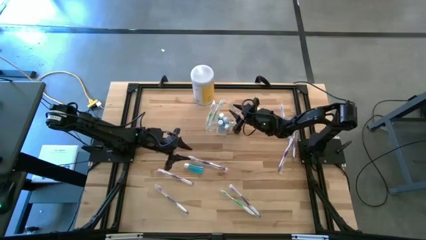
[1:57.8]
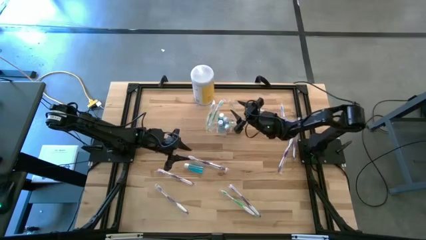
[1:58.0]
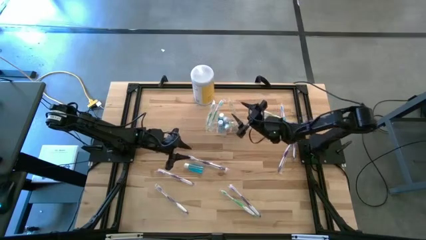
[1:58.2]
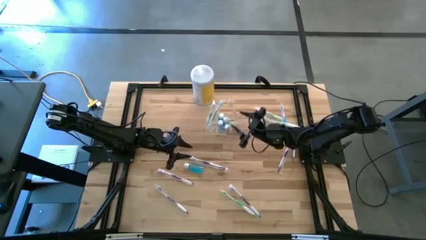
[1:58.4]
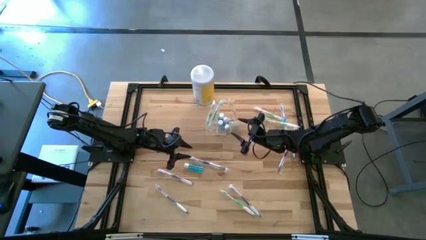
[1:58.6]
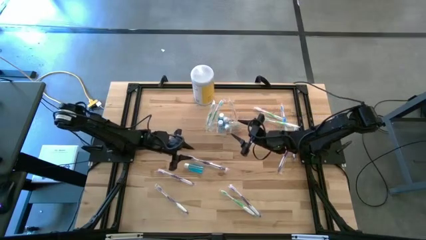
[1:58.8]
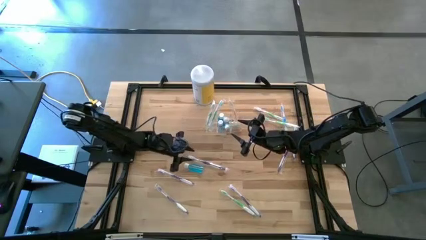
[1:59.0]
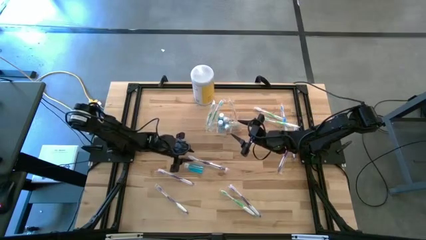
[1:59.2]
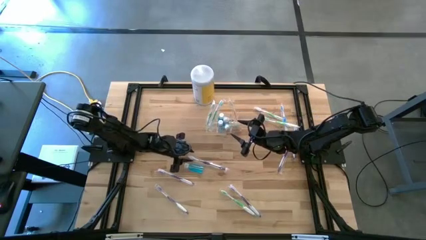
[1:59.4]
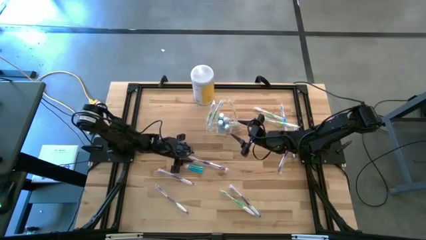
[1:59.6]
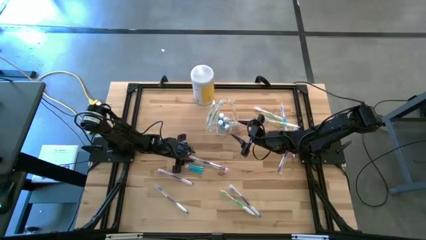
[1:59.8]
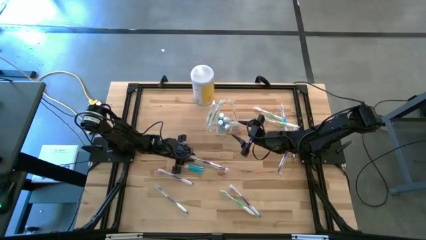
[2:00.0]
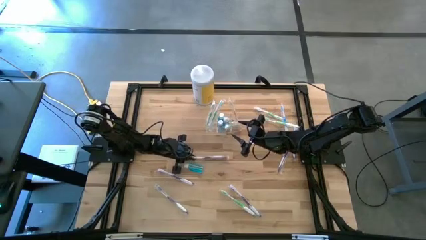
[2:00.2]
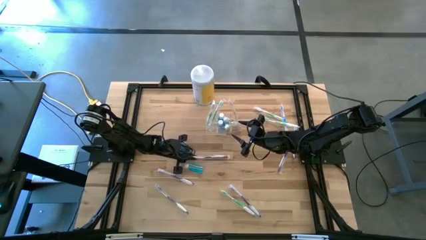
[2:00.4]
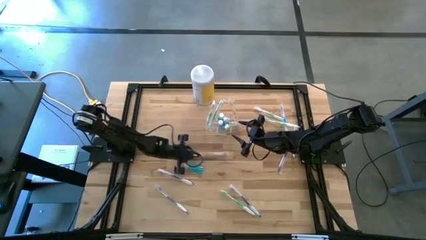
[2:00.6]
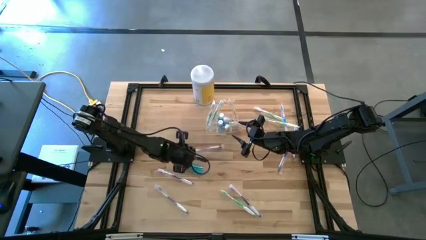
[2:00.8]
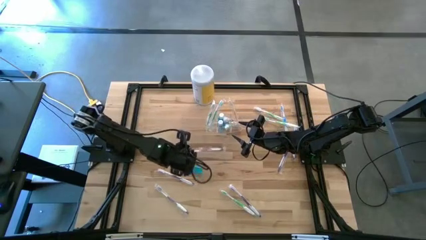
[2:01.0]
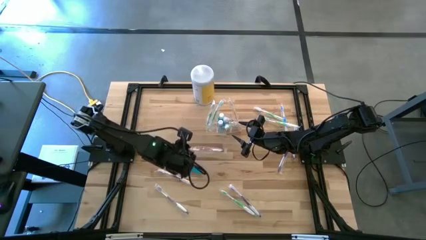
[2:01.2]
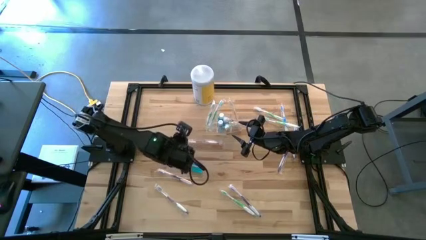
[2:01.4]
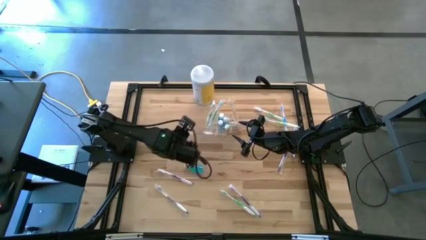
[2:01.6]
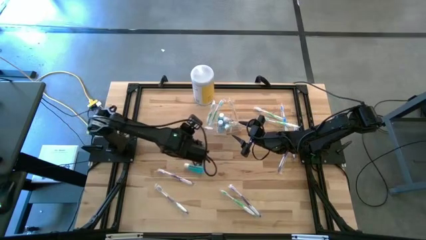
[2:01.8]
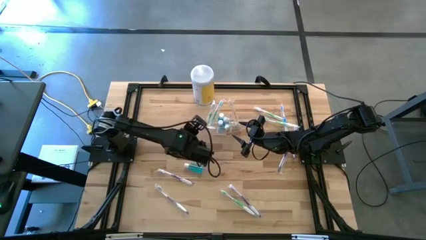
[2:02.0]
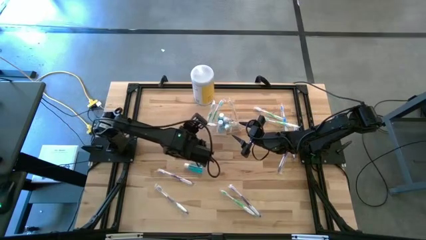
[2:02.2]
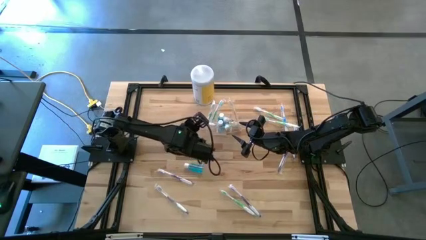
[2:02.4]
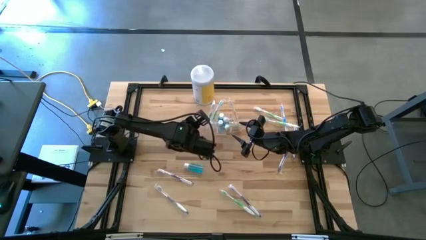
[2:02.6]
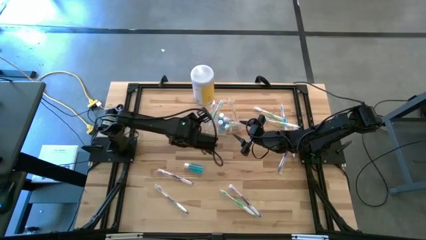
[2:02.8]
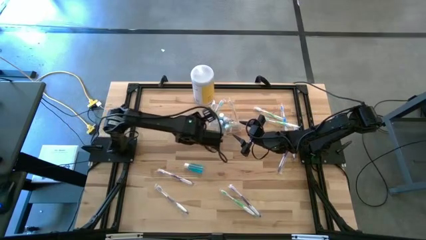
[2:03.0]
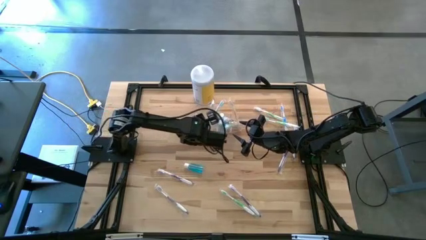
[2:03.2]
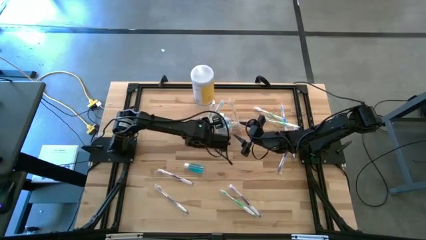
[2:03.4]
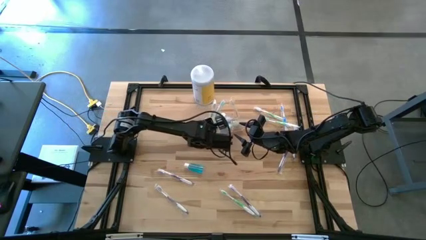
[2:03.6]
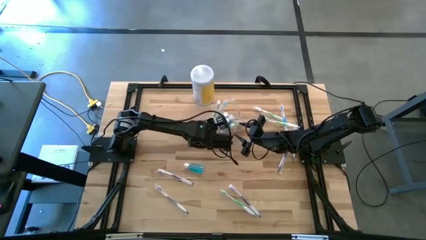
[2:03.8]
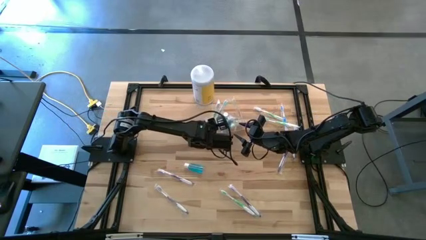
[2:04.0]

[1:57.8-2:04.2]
Task: Pick & Place toothbrushing station
Put the purple toothbrush into the transparent organizer

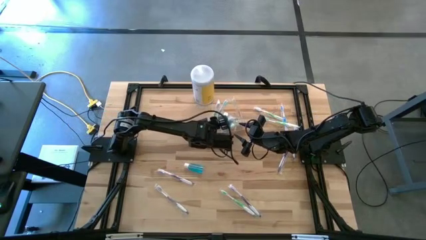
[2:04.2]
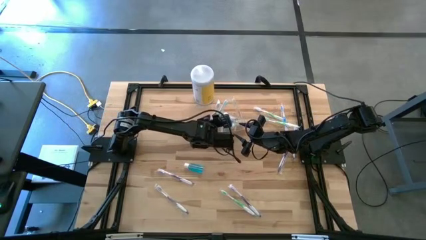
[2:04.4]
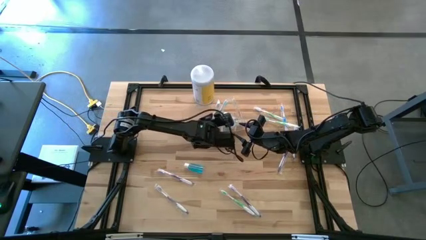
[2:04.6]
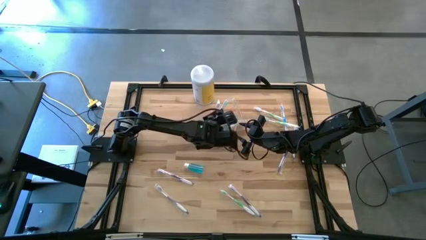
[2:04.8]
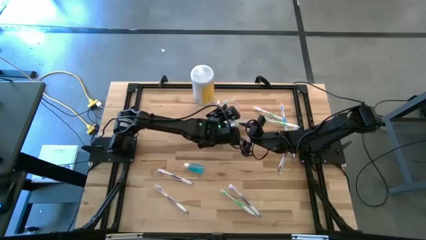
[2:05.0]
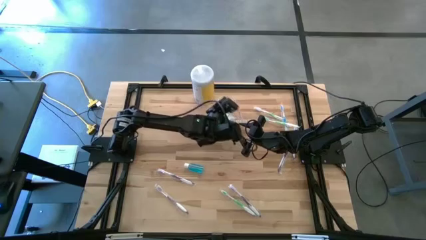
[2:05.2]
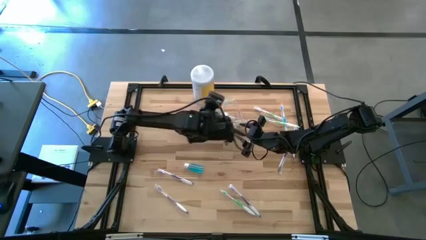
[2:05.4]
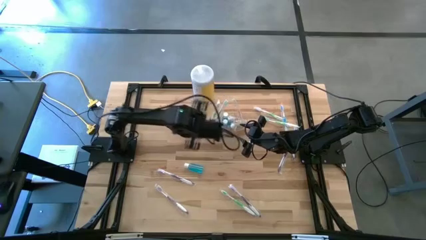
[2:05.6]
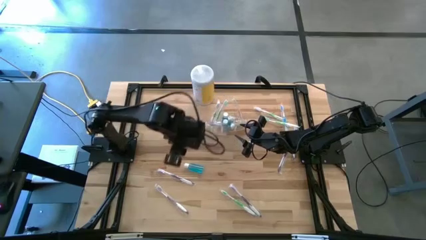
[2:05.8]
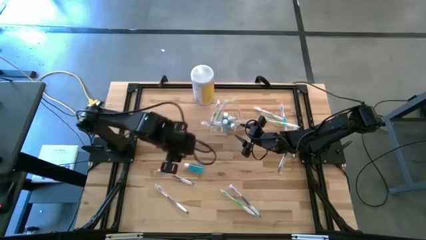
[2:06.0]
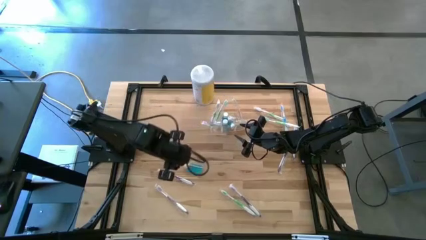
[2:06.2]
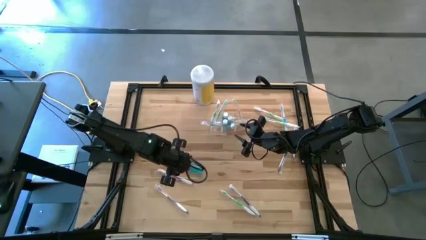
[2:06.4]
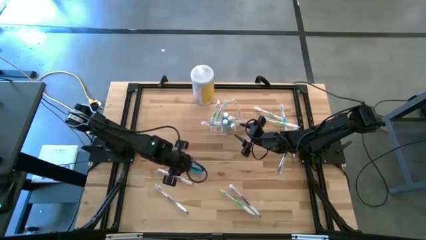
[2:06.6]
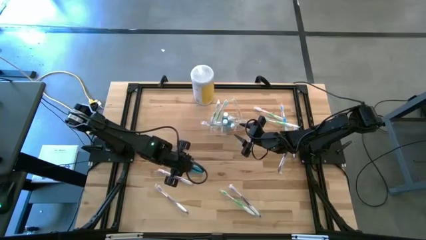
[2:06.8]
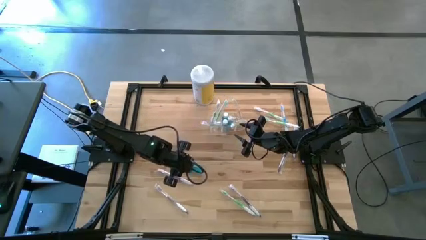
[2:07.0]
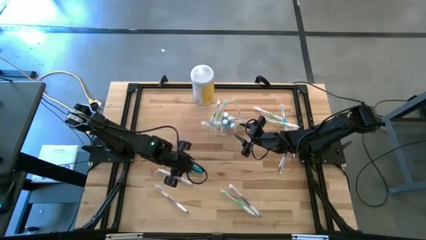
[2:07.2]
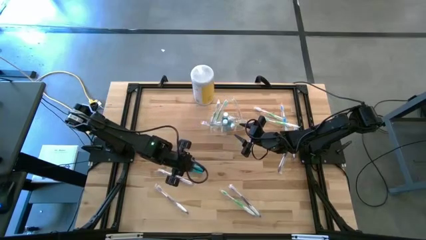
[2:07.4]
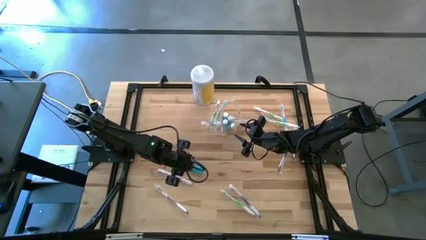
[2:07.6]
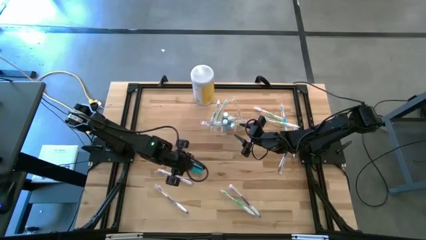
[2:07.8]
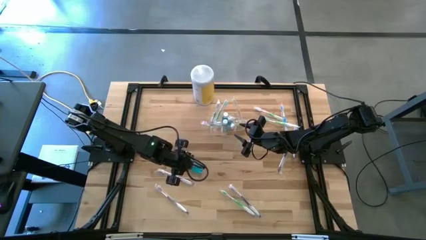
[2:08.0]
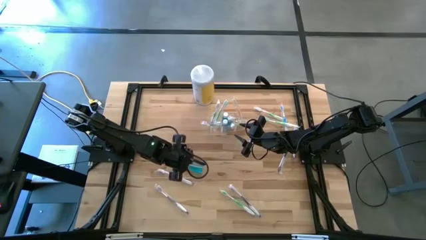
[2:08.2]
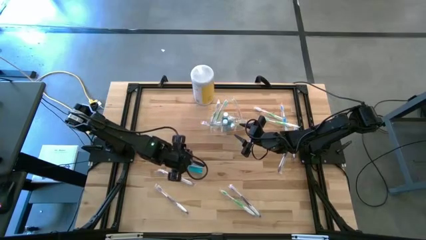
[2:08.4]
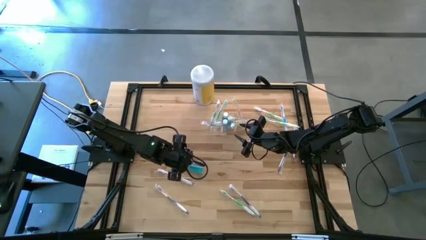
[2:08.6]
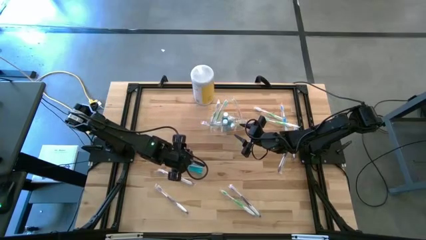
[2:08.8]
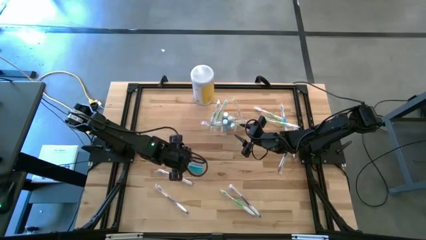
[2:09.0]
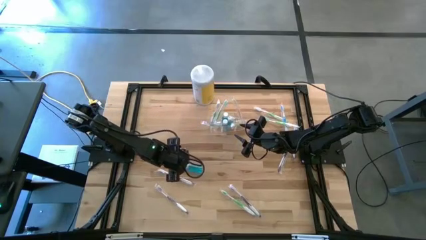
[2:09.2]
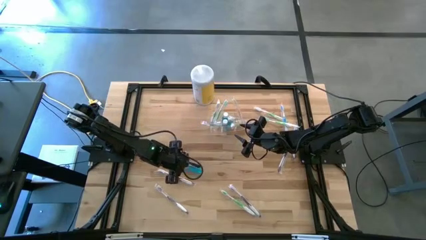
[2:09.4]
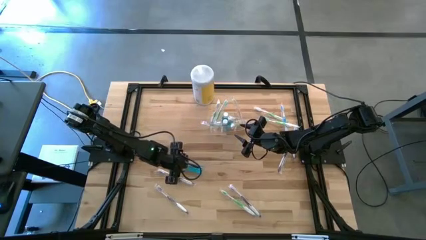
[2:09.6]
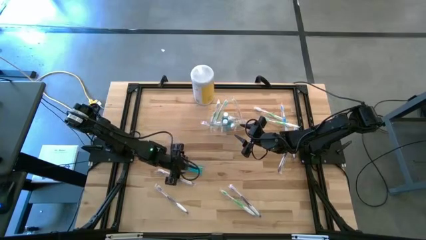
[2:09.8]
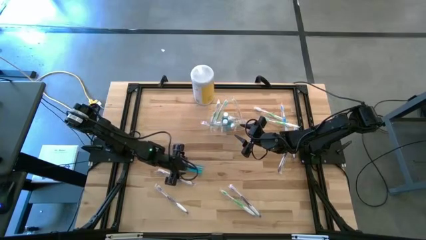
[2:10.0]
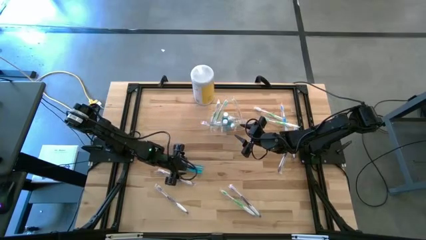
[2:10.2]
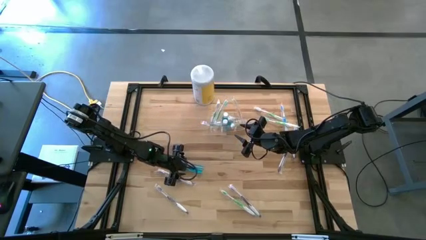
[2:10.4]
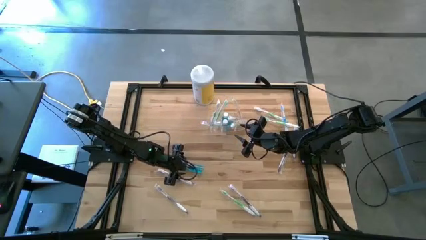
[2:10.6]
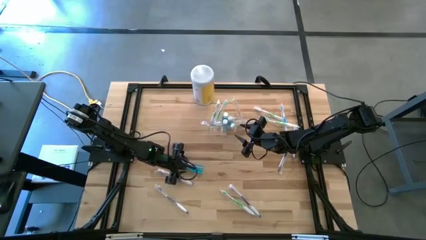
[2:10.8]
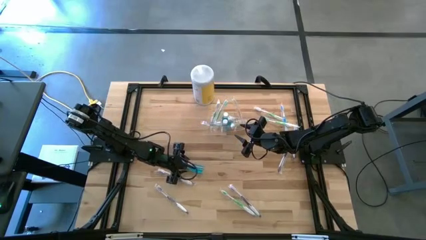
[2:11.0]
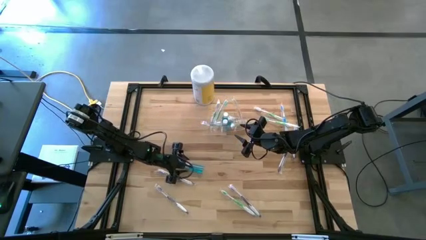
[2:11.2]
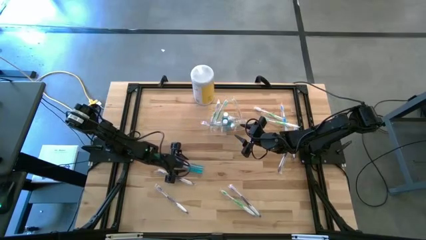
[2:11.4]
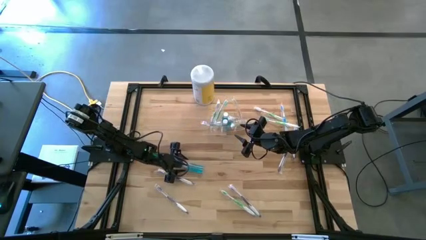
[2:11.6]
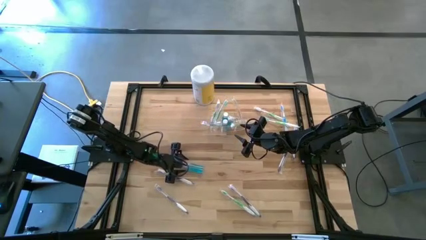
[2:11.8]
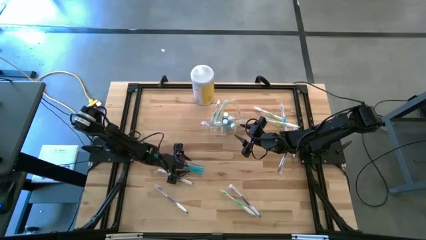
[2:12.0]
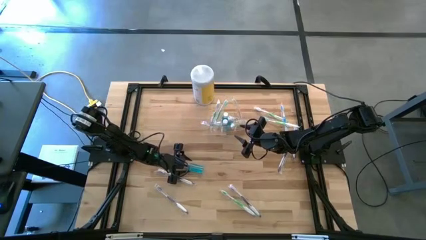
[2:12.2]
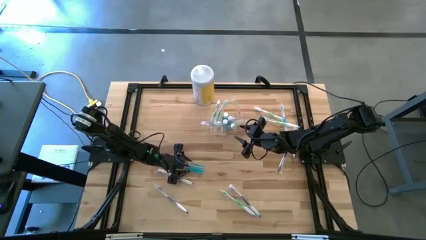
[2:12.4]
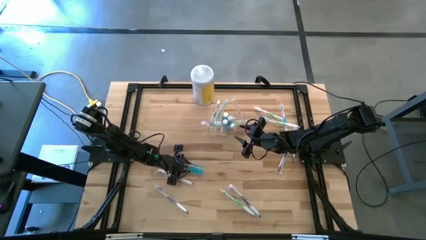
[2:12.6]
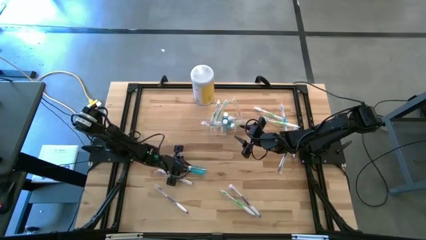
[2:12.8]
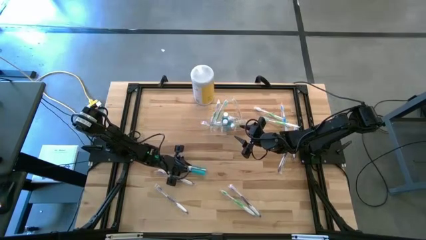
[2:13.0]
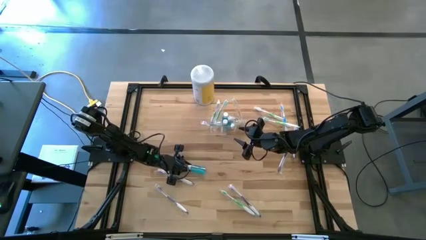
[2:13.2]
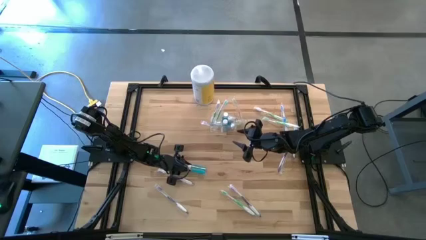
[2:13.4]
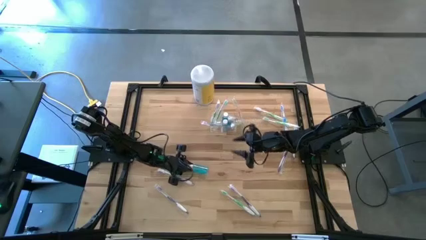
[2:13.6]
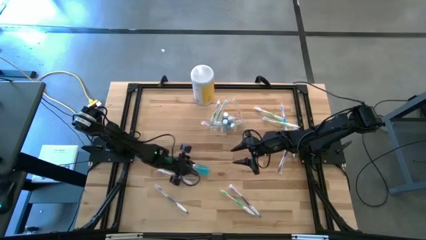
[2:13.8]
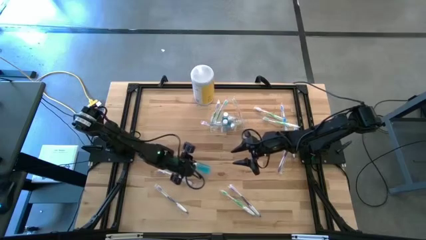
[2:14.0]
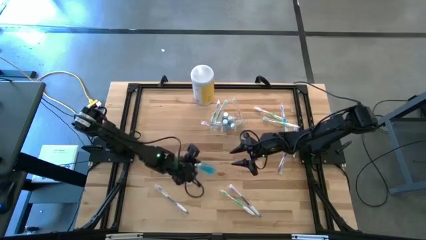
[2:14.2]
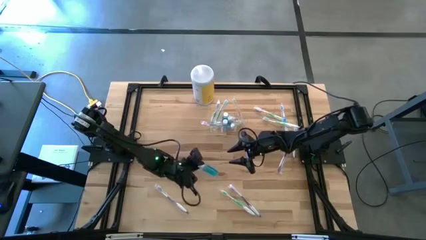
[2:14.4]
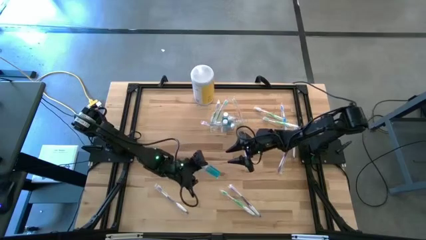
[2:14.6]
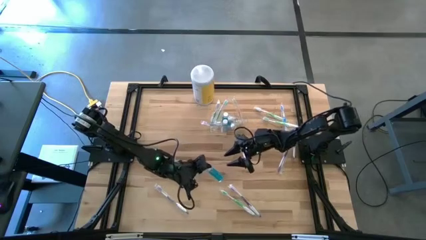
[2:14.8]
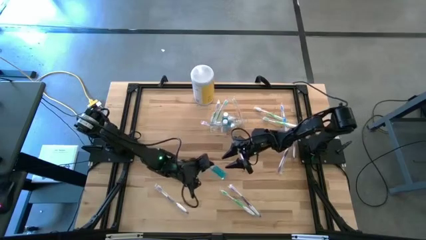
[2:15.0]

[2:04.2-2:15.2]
Put the mouthwash into the transparent organizer
